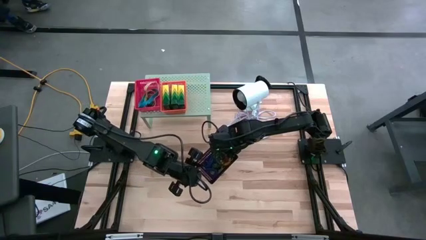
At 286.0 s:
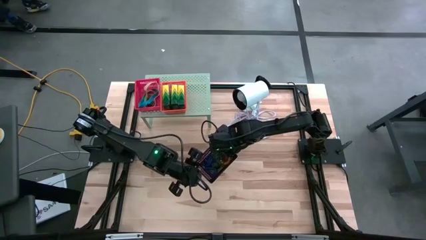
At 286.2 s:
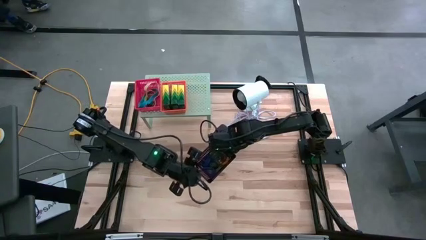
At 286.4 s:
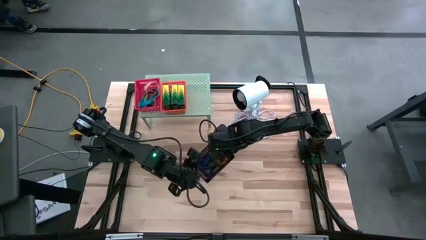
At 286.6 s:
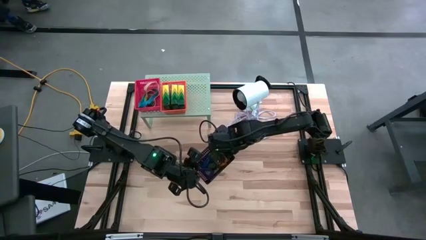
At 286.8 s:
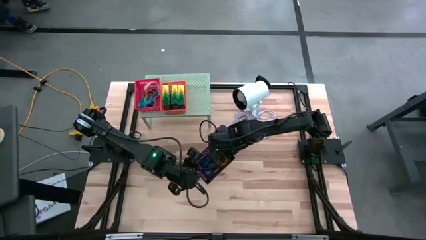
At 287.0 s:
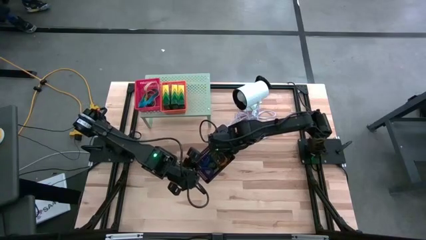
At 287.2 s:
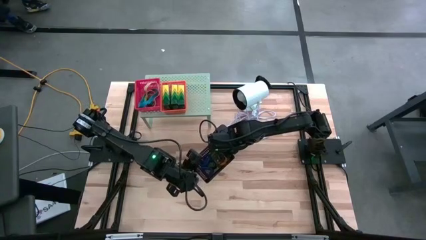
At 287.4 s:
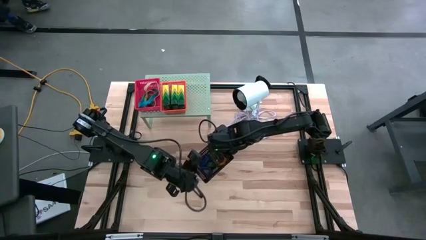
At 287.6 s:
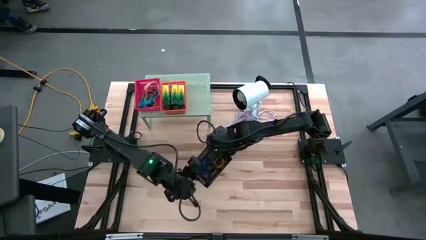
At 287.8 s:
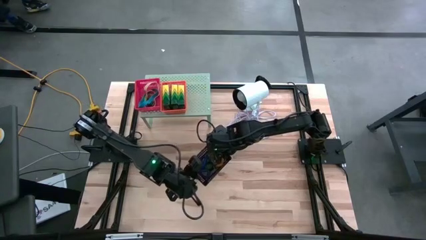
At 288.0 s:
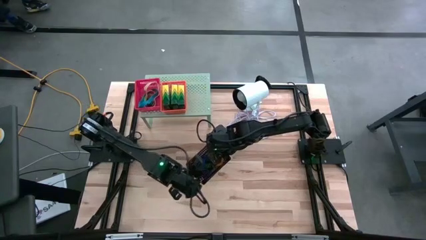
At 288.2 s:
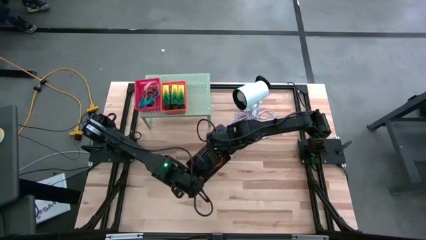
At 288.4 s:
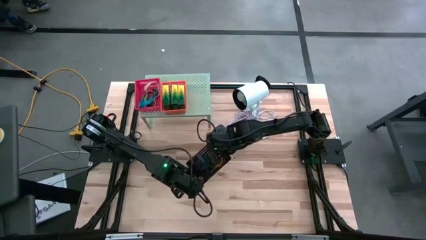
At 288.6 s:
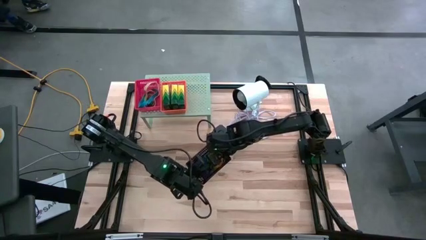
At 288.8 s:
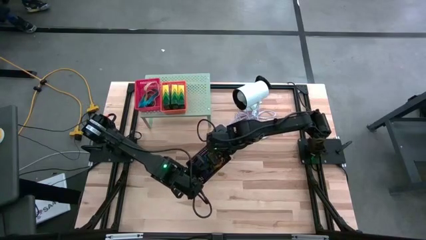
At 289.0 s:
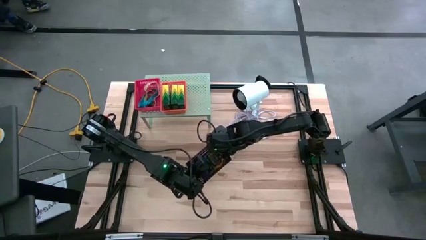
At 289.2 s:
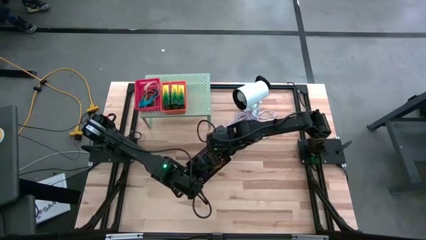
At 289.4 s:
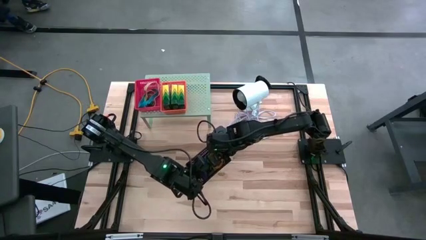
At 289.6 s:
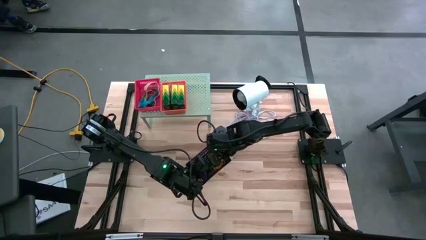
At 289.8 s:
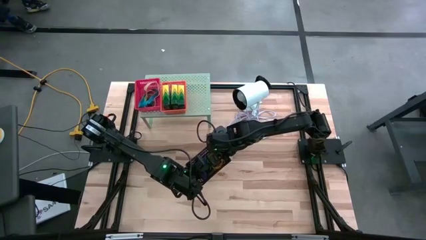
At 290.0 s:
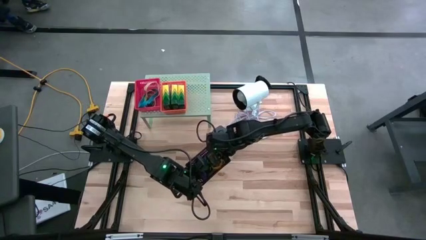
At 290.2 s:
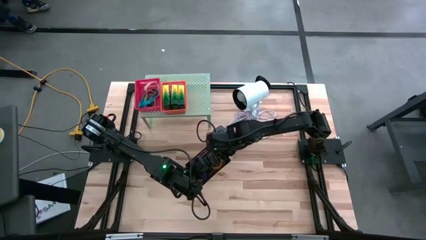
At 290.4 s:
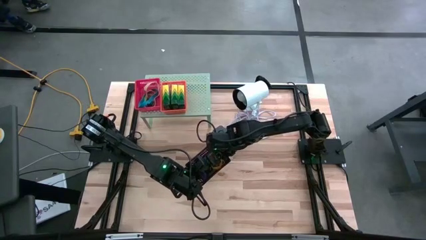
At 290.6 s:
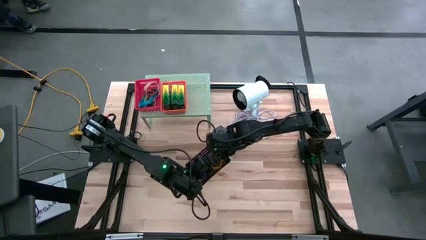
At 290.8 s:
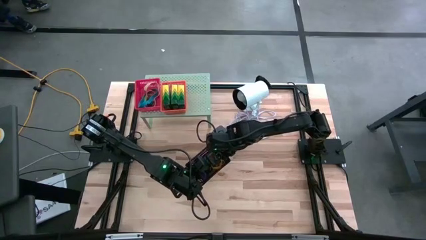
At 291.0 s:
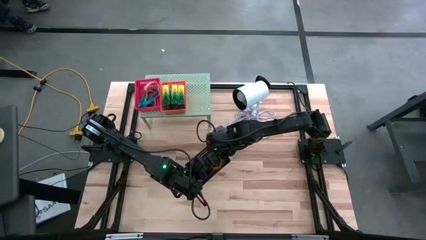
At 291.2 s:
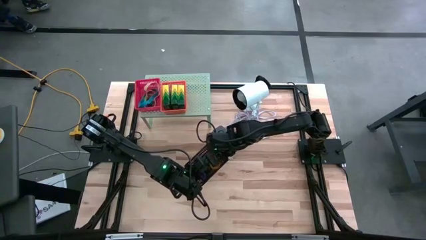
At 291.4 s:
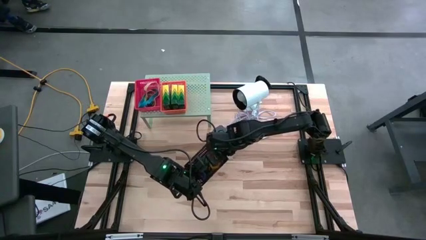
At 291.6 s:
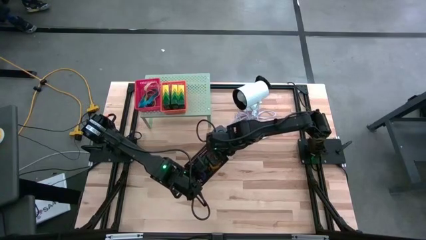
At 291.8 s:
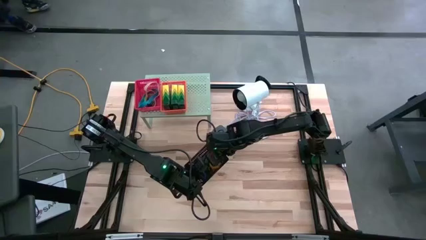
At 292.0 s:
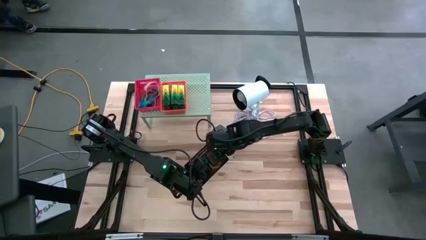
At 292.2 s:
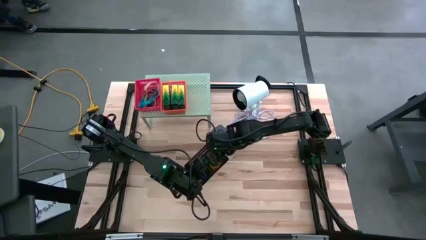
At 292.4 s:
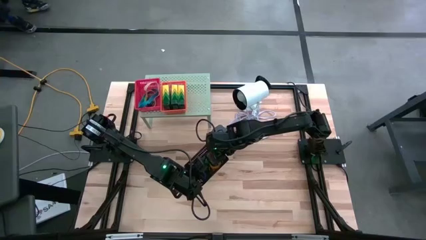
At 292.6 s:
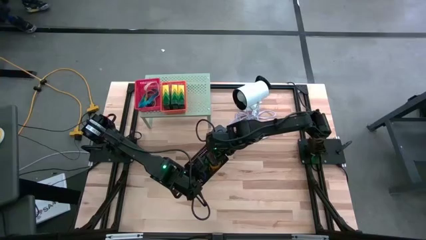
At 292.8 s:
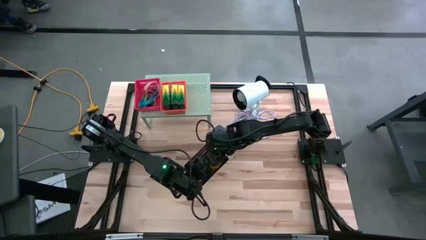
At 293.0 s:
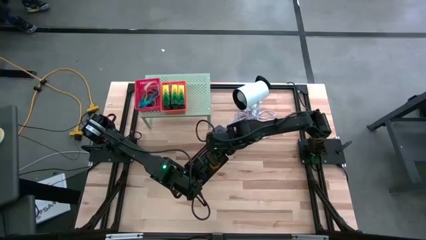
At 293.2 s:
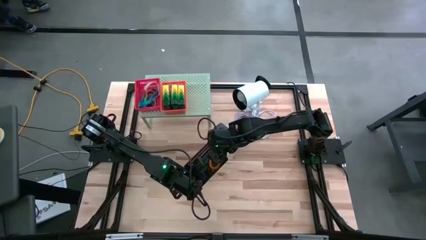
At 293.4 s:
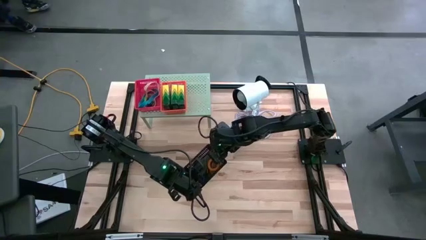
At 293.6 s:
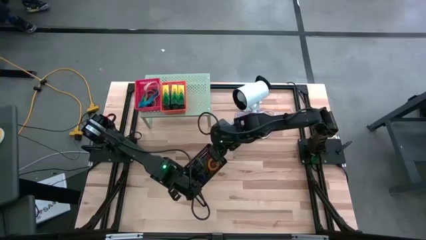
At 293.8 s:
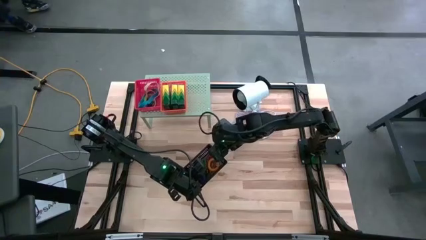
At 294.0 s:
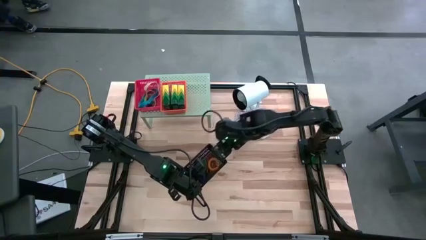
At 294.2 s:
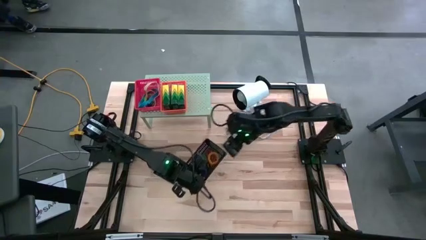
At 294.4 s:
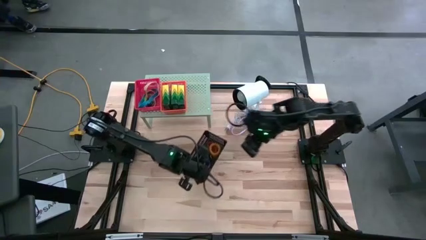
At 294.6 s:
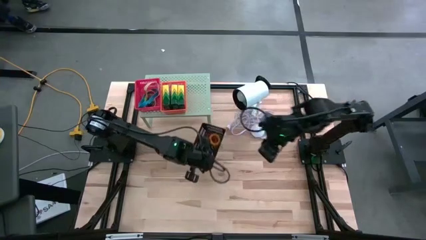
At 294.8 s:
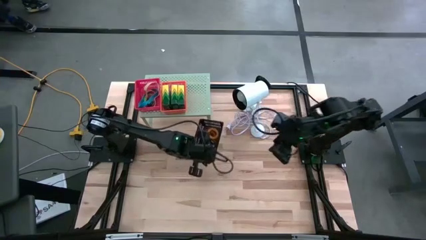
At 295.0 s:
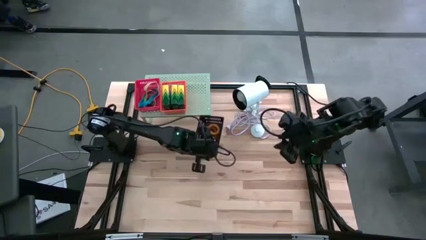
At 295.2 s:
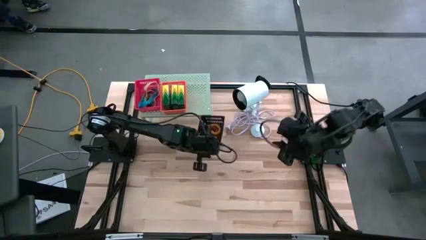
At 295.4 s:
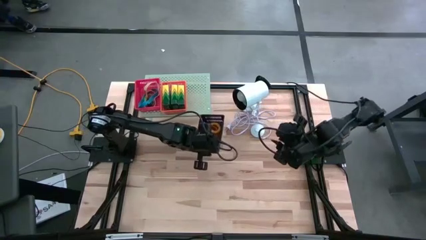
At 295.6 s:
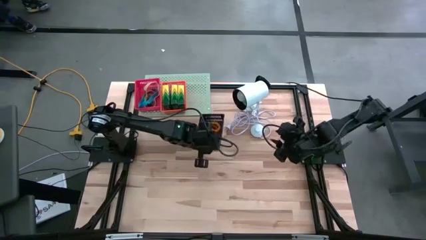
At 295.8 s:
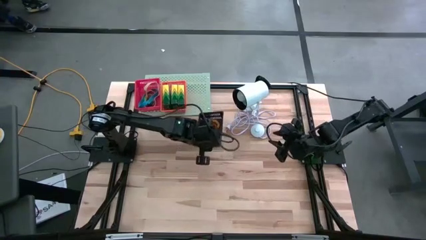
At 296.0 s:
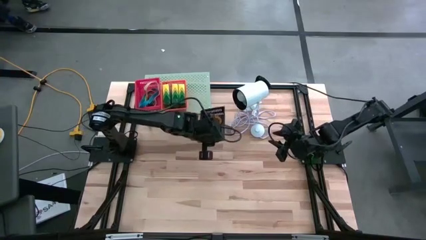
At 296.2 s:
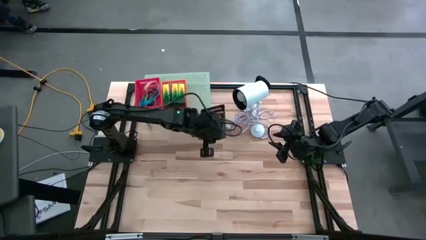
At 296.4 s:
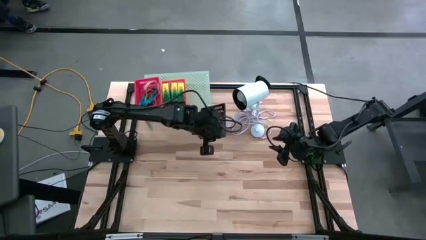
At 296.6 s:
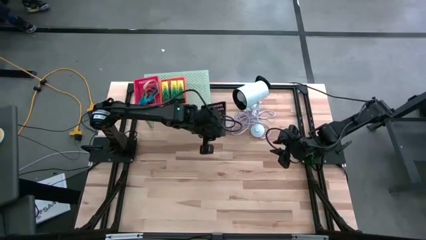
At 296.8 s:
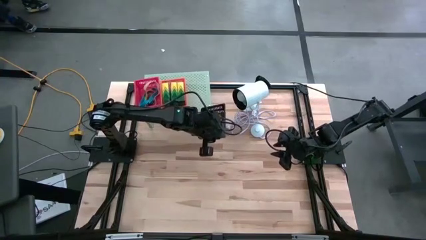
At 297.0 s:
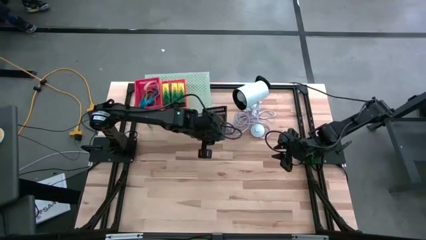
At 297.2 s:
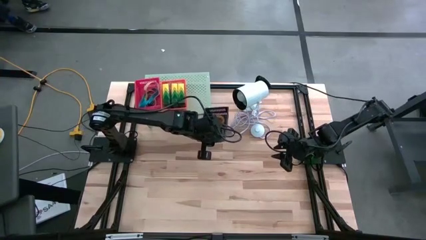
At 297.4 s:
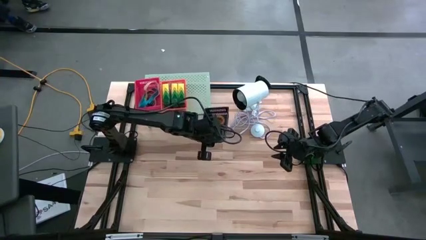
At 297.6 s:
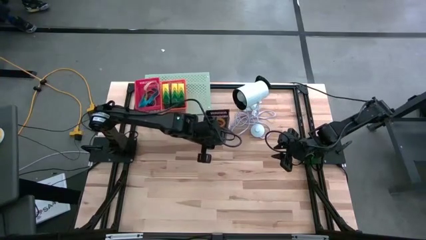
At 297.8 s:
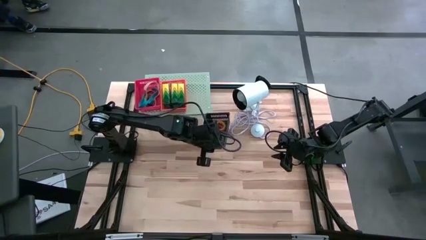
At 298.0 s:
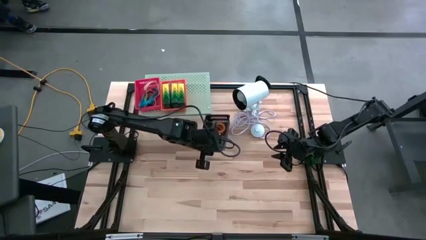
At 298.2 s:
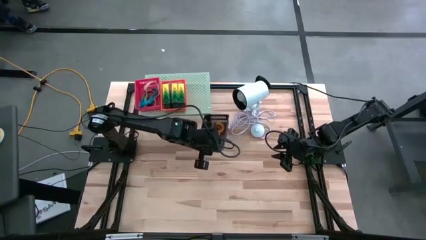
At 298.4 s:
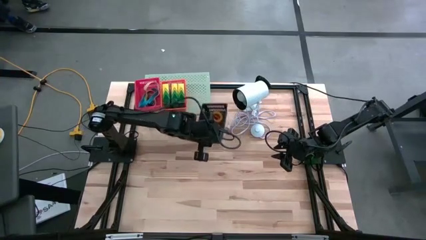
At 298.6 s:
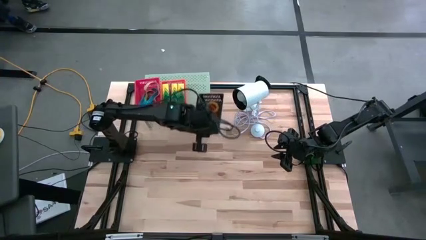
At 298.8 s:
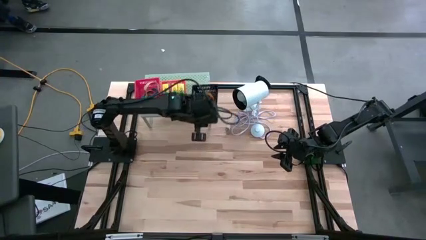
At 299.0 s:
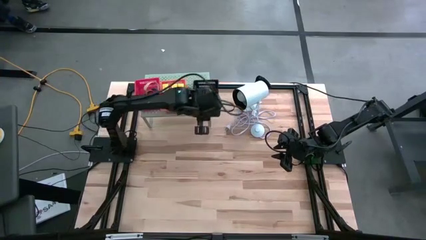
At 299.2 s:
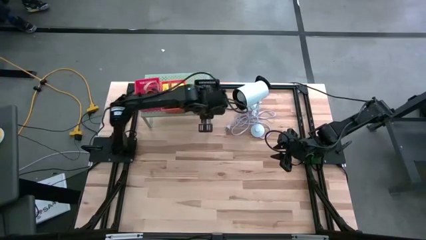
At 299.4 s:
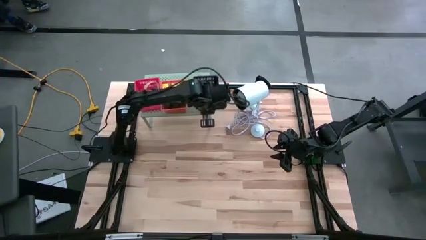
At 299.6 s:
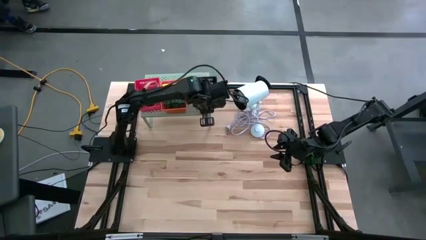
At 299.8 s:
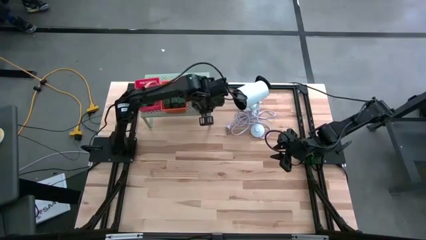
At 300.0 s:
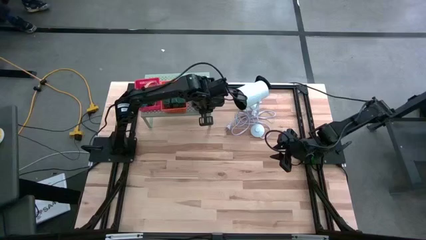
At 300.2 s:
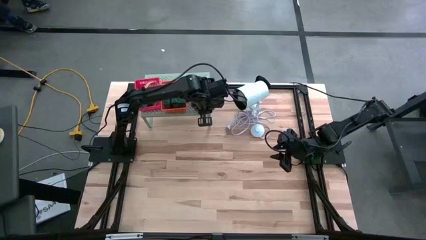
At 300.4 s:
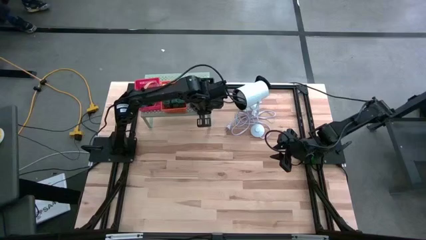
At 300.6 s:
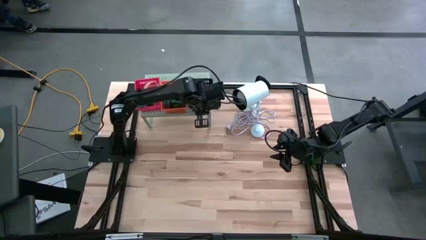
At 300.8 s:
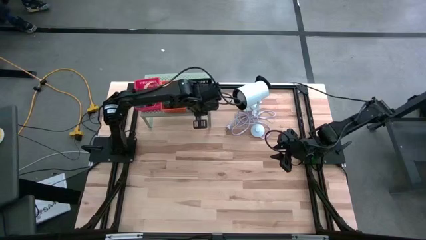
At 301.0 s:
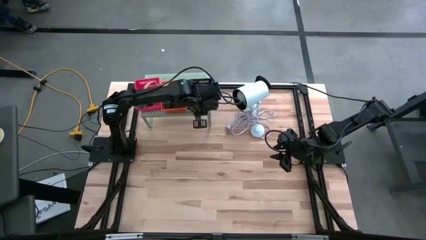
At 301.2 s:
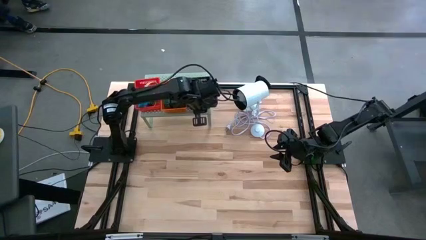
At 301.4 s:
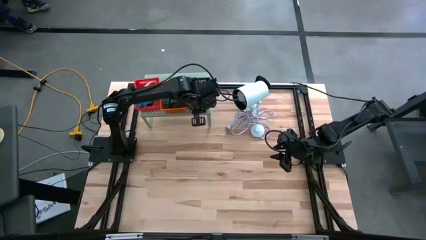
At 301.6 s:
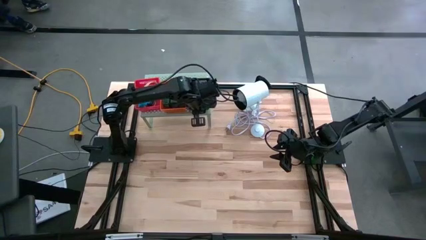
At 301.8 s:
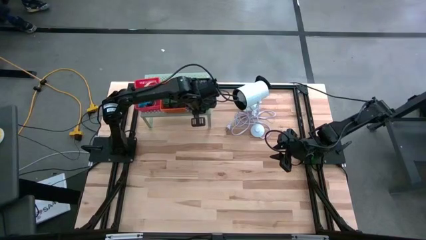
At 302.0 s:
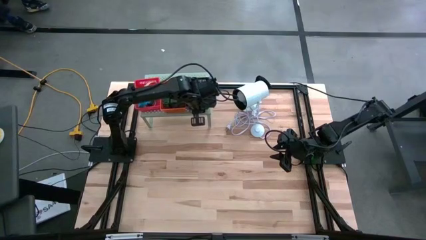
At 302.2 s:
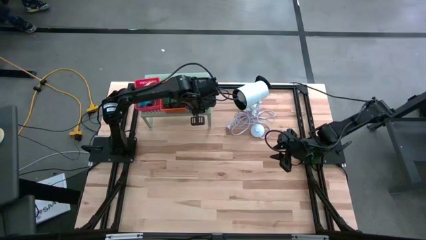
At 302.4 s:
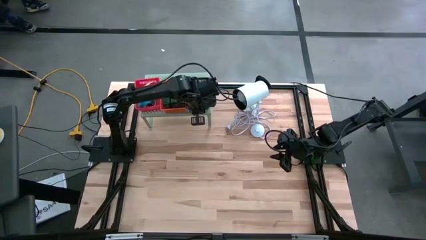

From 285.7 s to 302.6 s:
Task: Pick & Place Office Desk Supplies
Put the black basket on the shelf
